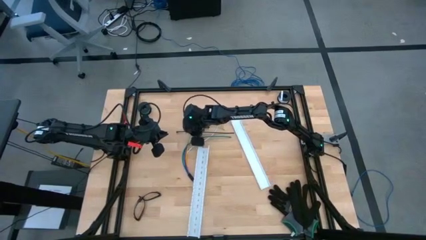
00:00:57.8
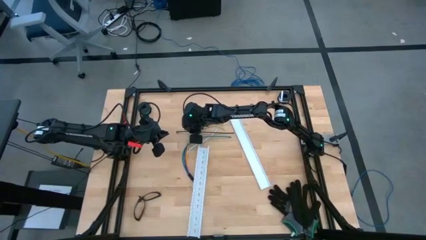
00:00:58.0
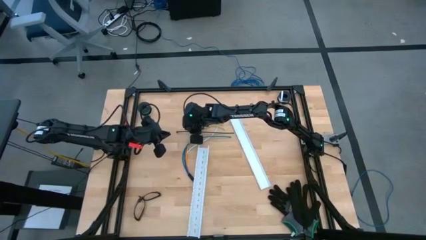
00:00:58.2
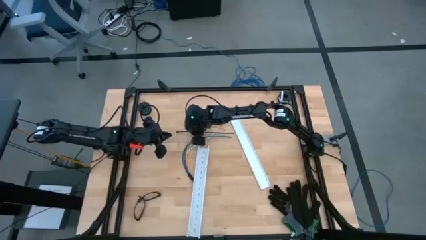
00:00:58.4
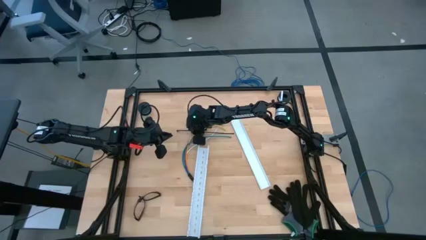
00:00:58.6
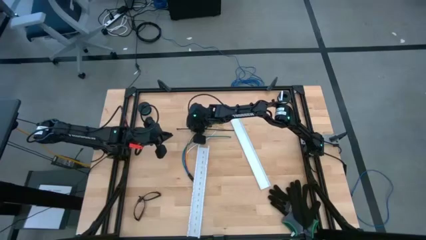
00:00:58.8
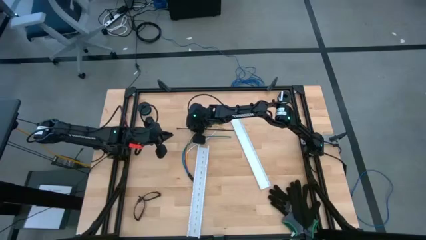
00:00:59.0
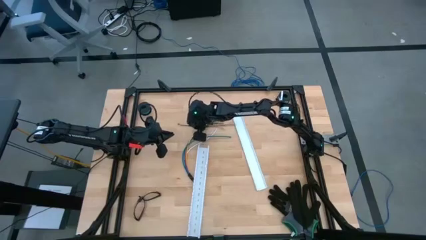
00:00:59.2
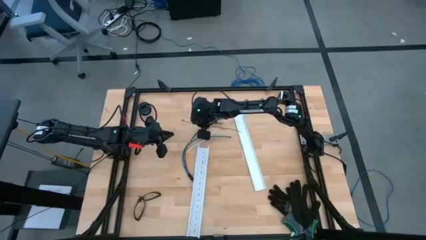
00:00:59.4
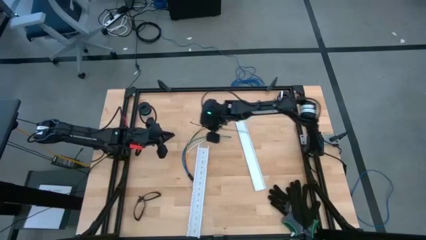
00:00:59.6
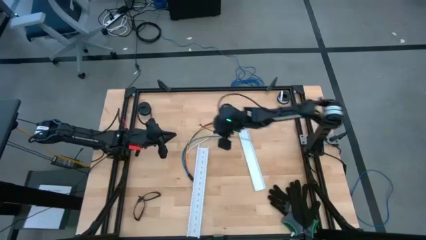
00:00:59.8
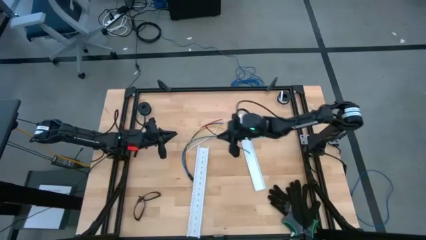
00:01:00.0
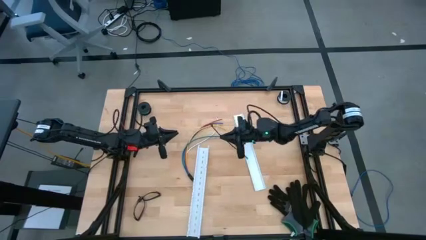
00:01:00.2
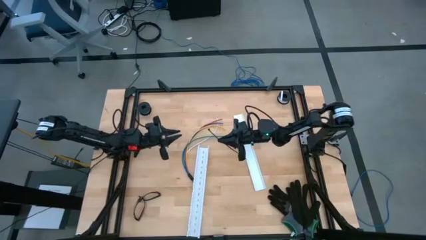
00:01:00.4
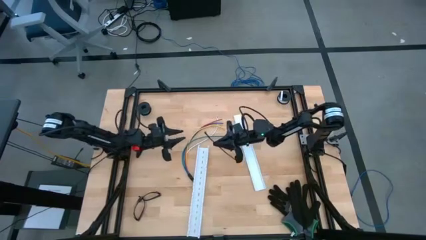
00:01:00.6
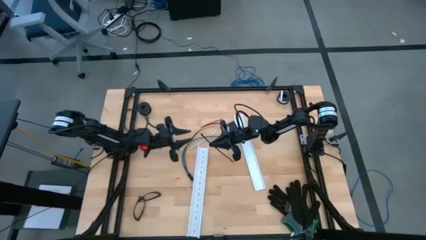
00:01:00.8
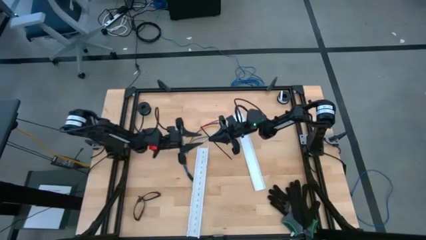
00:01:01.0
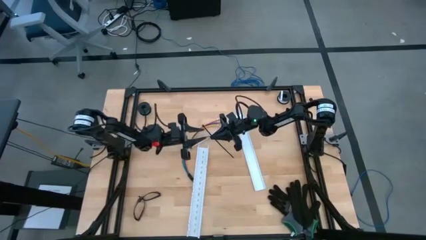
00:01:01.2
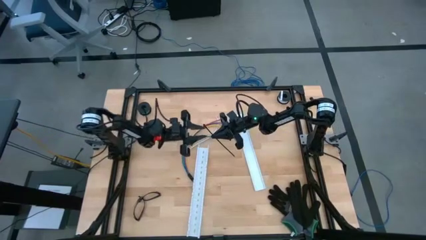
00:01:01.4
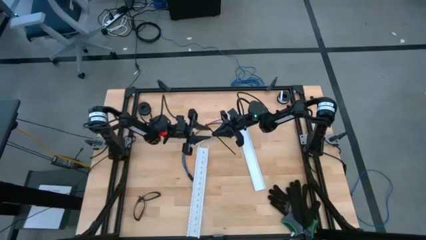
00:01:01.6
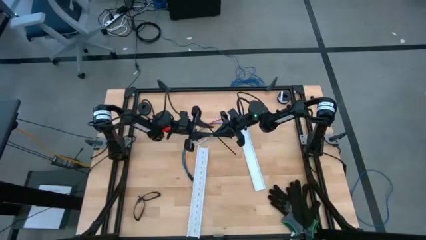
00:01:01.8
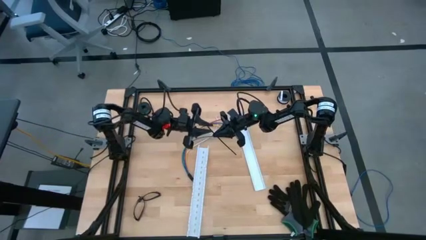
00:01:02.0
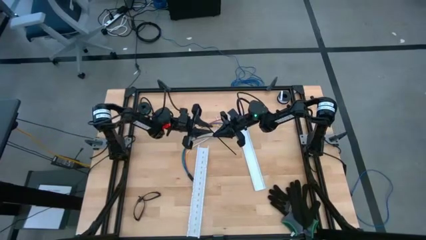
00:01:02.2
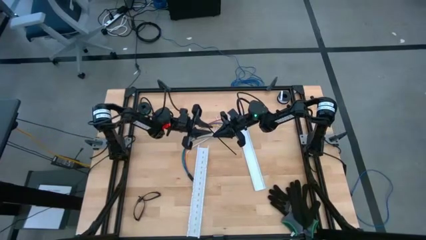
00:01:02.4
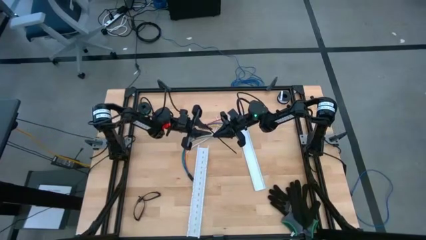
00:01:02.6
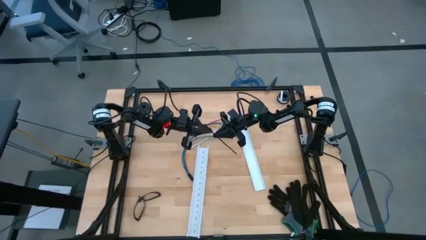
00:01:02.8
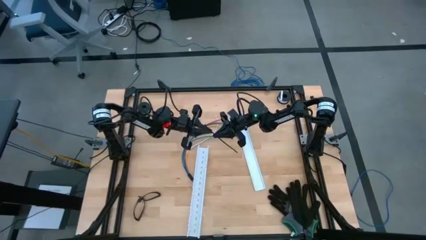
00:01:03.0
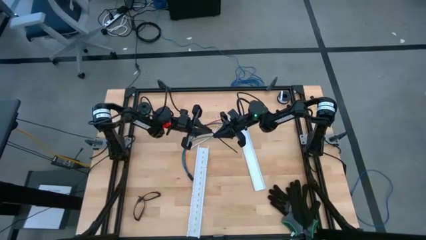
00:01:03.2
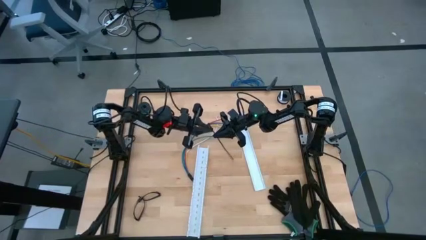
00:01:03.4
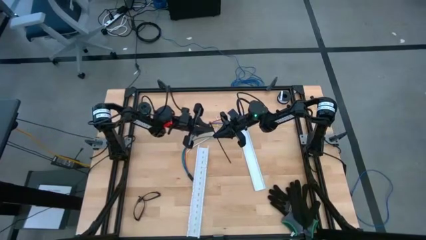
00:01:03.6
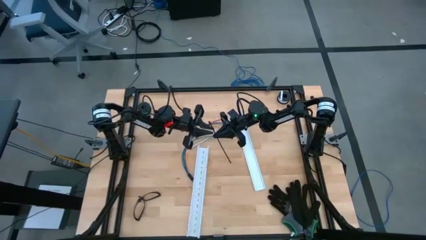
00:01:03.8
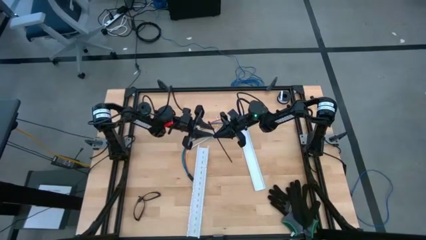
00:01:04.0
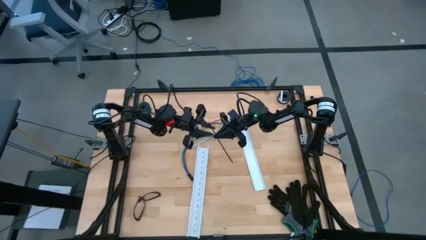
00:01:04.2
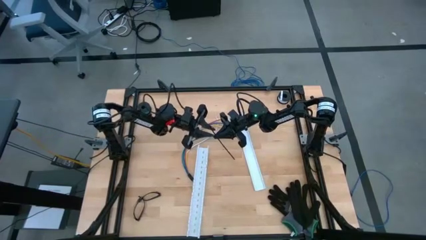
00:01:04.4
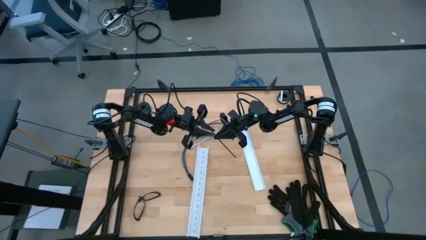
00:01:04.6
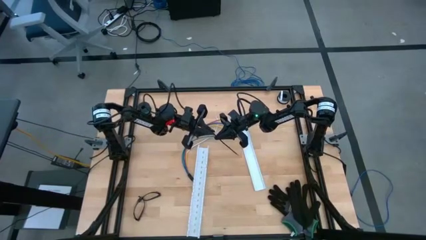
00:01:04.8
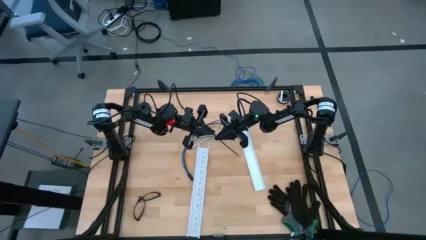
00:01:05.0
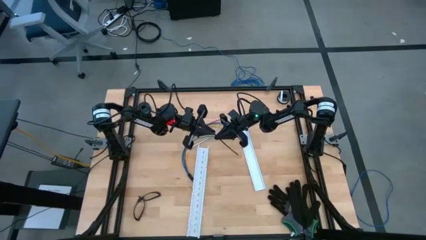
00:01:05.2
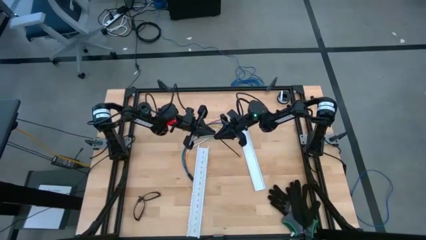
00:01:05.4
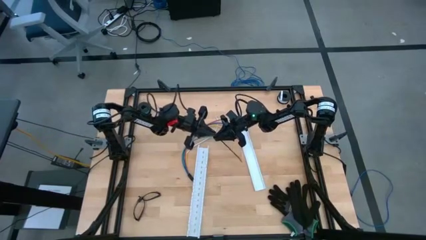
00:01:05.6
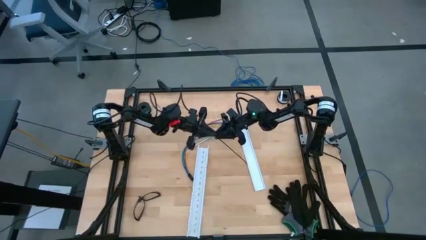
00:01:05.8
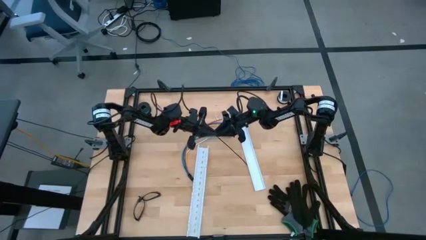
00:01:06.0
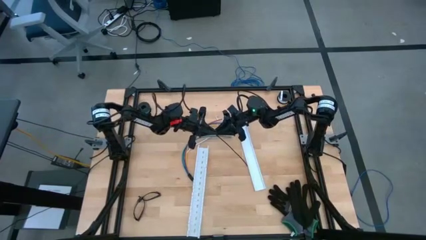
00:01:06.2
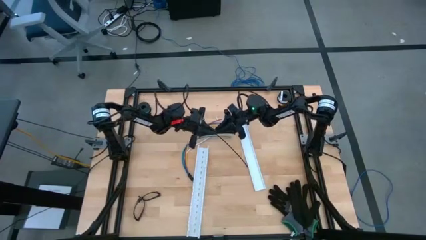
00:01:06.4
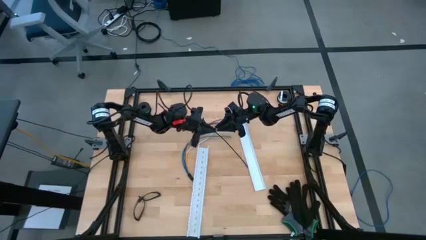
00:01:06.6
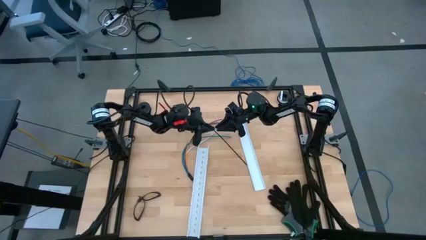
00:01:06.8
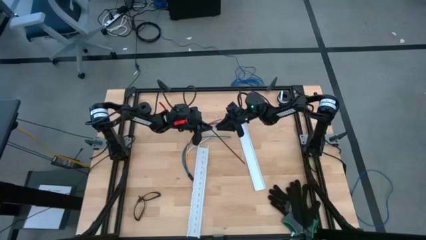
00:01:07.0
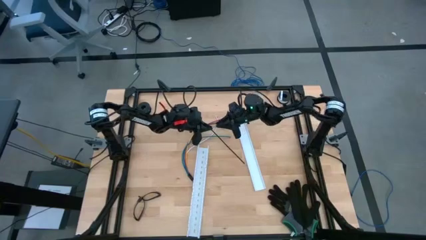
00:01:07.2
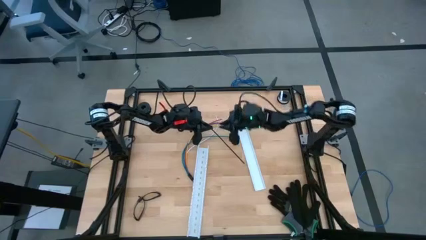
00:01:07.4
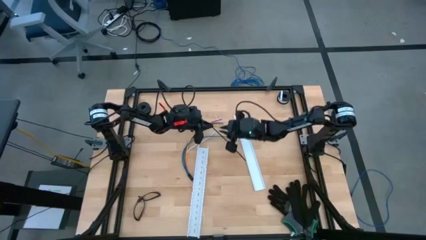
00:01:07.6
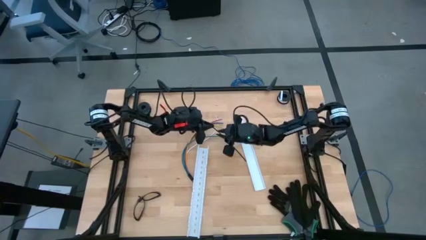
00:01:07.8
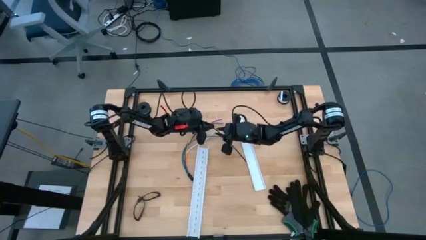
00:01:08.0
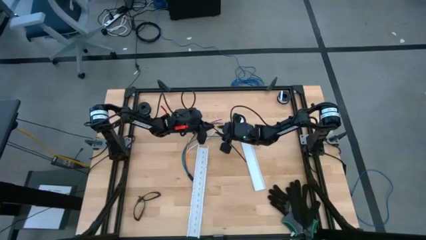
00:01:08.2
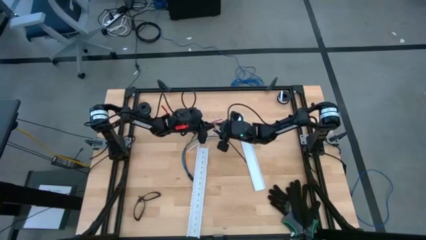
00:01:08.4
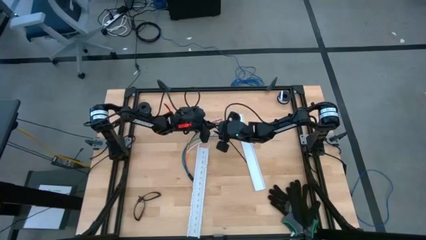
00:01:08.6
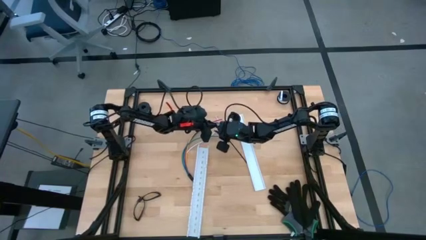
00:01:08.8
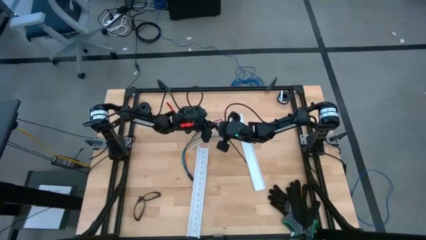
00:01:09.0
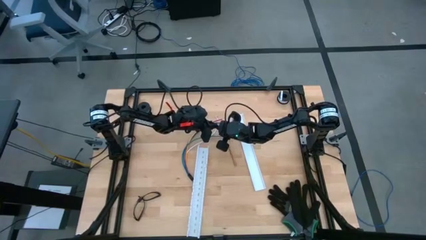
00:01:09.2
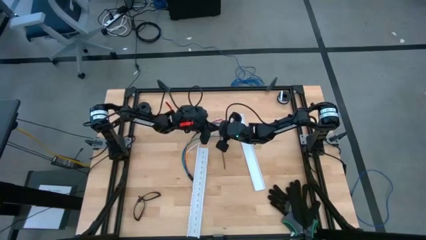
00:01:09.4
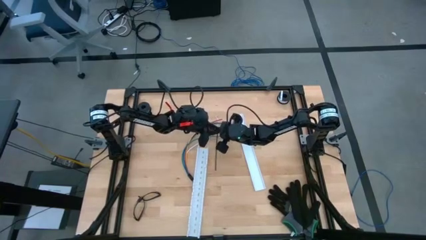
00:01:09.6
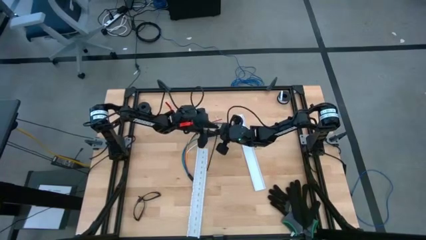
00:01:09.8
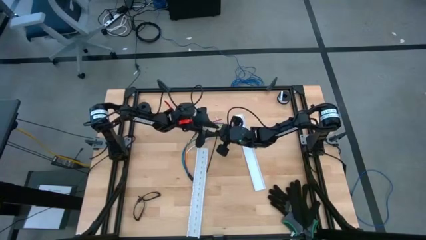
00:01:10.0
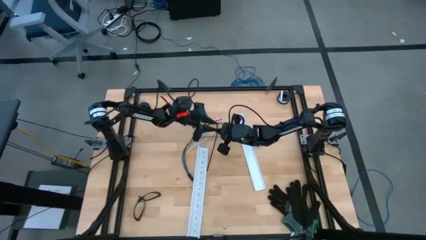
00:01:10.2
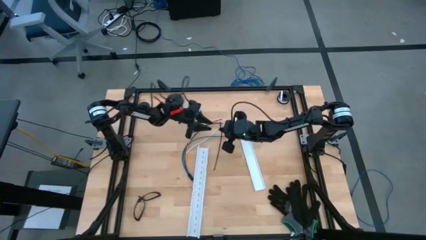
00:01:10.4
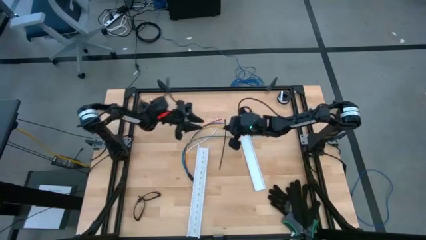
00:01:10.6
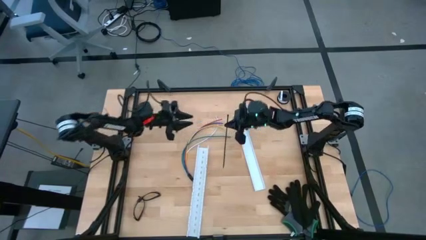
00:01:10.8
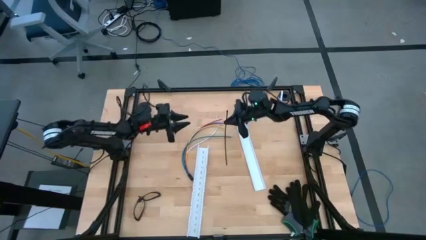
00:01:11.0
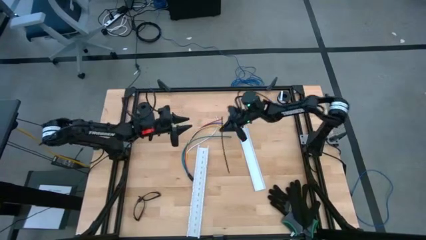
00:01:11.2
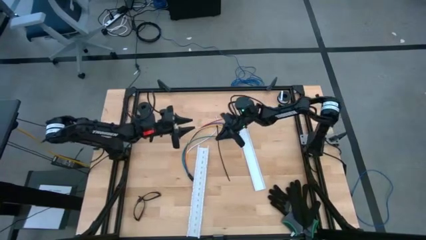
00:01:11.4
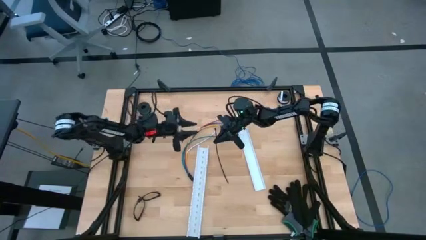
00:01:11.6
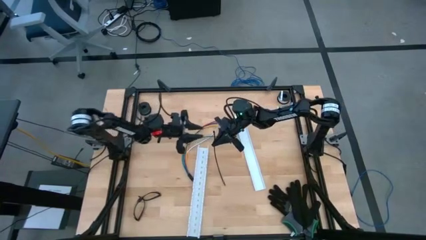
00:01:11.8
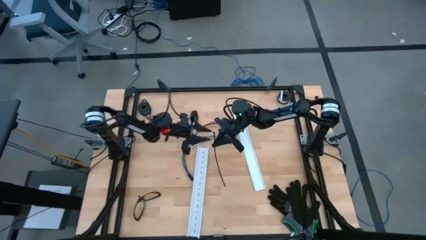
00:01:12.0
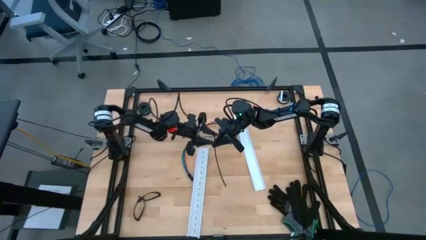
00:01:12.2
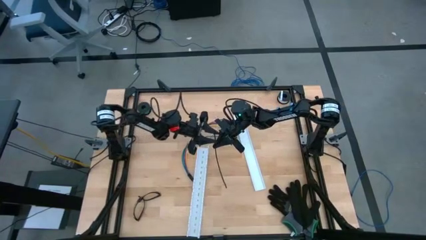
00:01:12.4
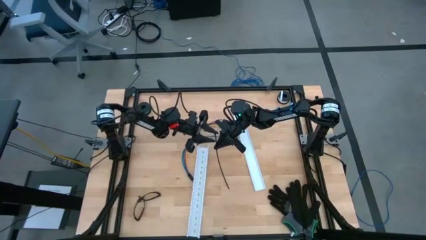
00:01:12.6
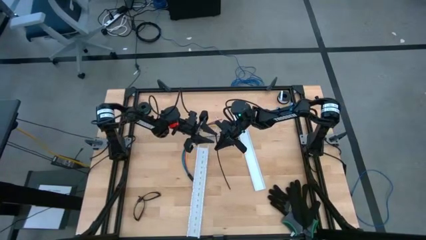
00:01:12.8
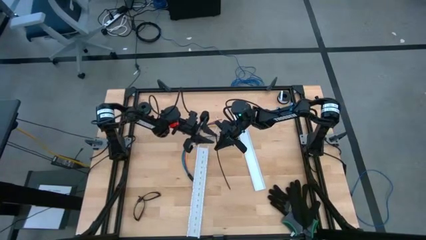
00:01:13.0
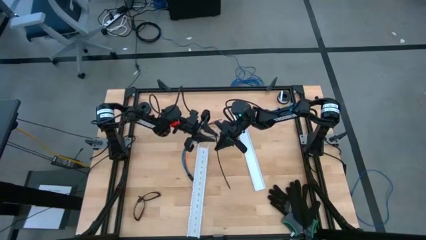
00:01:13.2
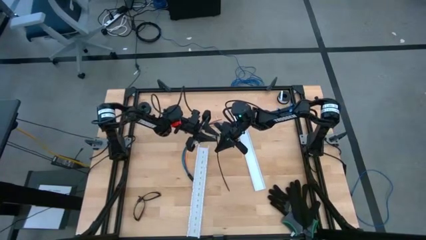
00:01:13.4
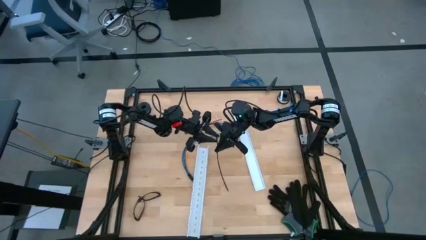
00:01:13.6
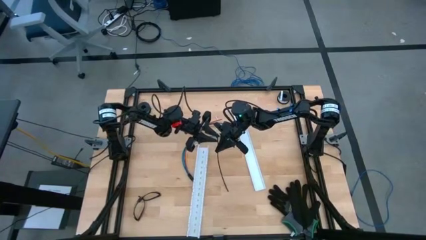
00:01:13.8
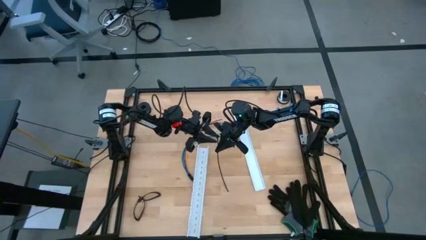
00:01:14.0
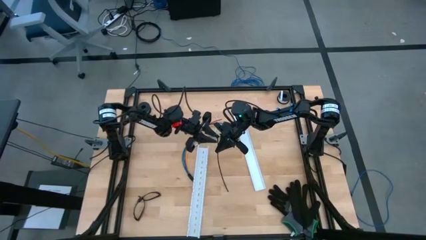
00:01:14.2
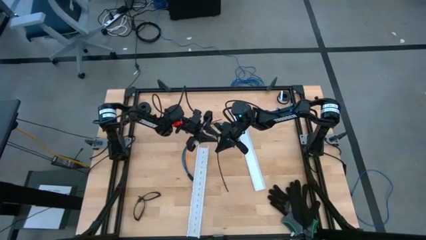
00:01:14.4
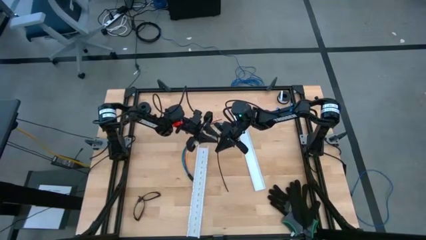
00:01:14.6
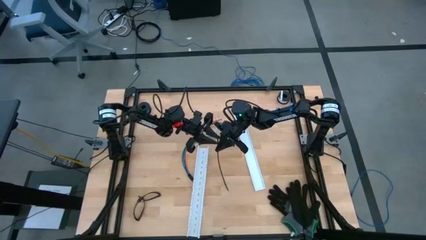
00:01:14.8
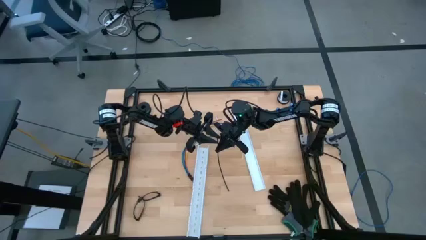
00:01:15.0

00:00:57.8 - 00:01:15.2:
Task: Ziptie cables
Wrap the black zip tie around the object
